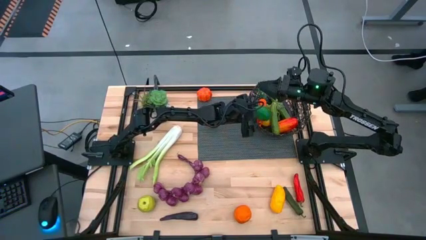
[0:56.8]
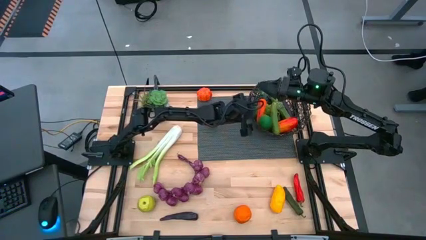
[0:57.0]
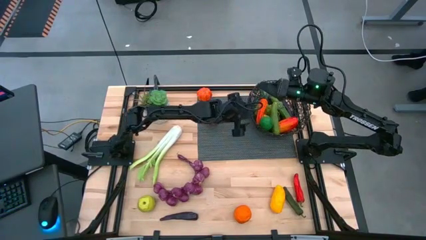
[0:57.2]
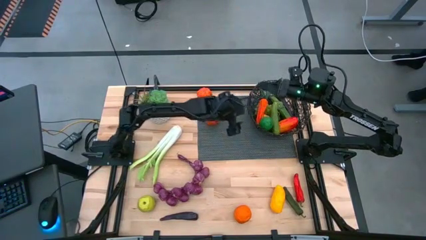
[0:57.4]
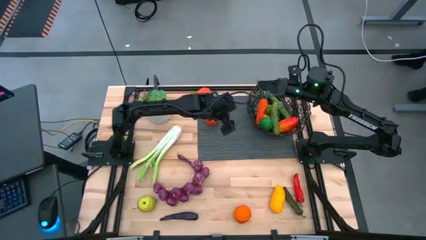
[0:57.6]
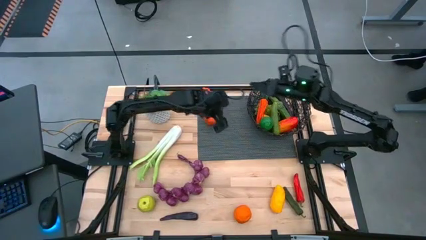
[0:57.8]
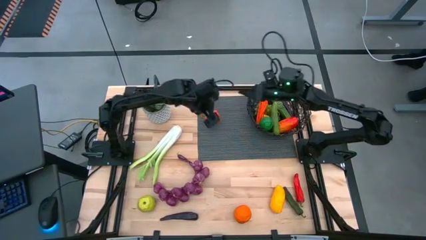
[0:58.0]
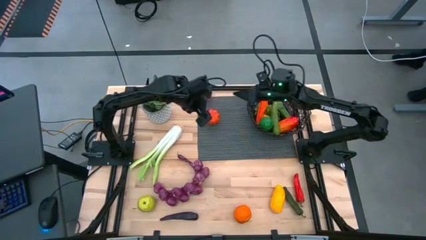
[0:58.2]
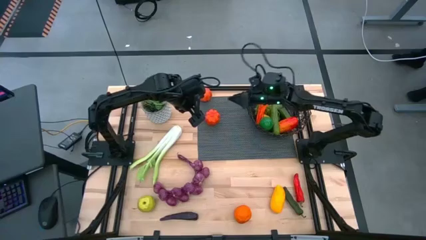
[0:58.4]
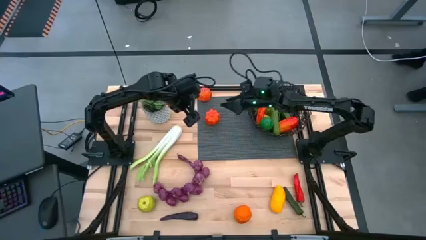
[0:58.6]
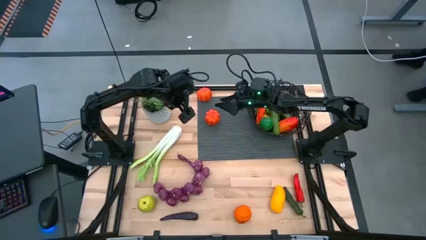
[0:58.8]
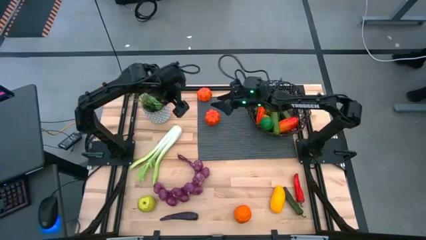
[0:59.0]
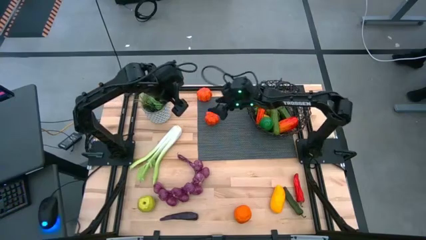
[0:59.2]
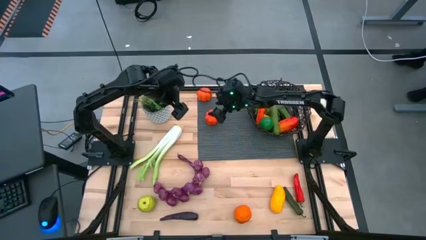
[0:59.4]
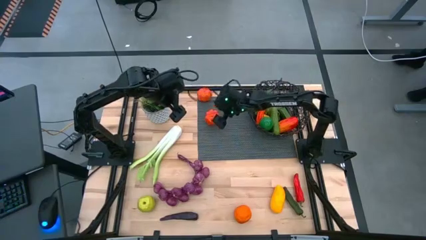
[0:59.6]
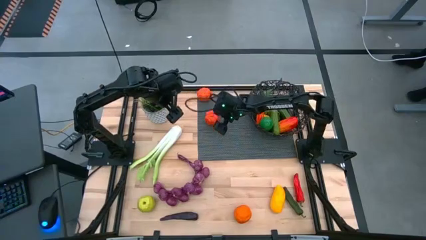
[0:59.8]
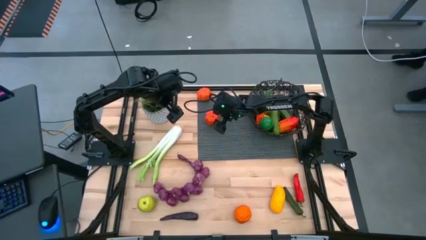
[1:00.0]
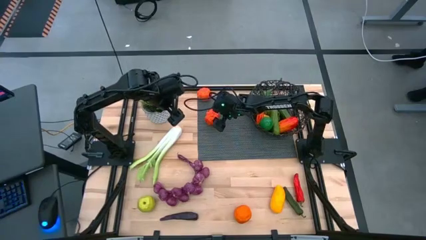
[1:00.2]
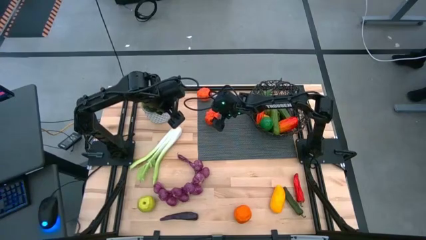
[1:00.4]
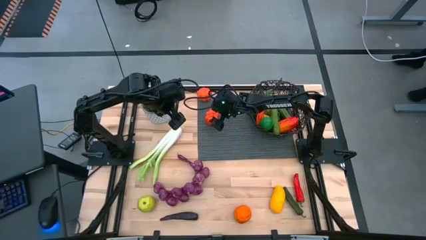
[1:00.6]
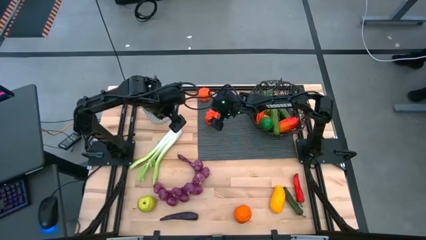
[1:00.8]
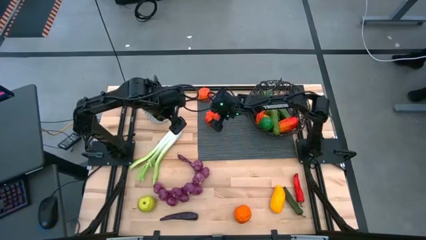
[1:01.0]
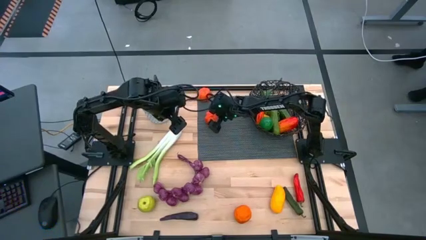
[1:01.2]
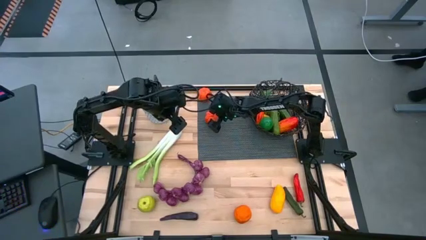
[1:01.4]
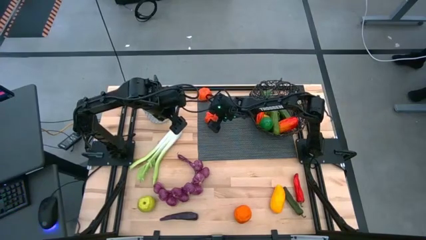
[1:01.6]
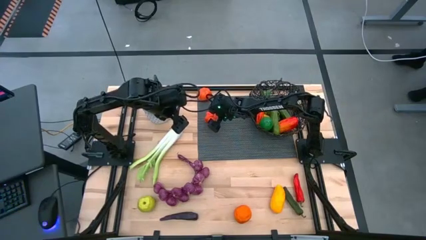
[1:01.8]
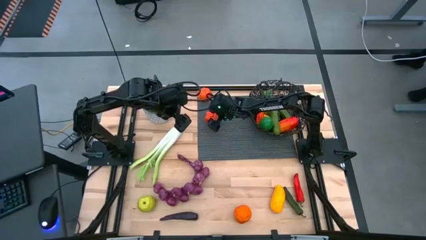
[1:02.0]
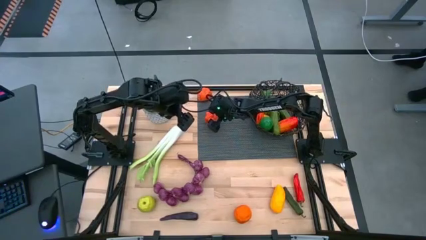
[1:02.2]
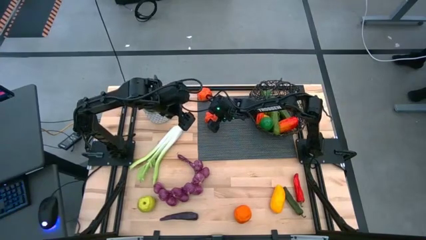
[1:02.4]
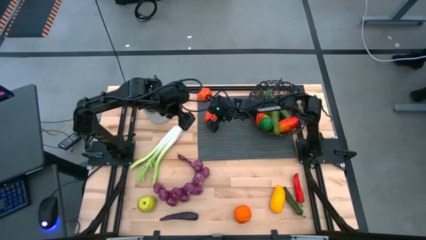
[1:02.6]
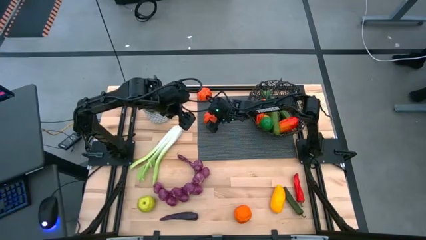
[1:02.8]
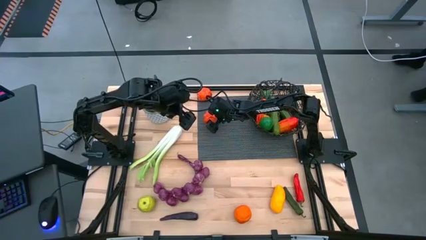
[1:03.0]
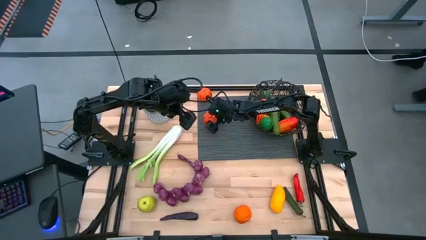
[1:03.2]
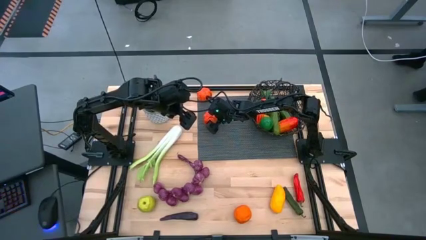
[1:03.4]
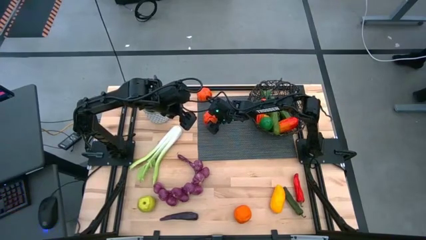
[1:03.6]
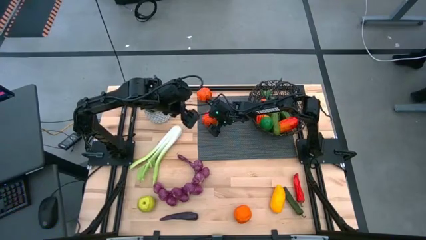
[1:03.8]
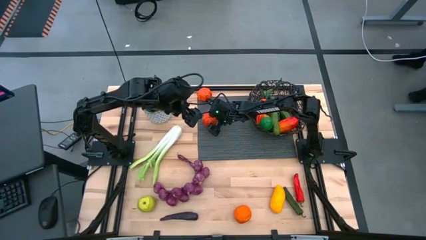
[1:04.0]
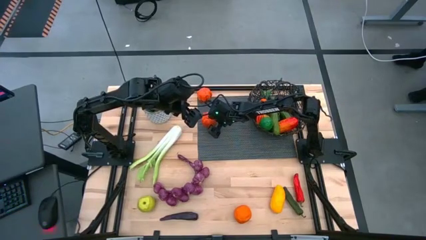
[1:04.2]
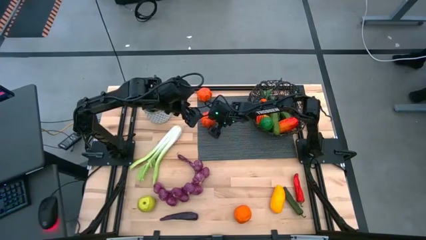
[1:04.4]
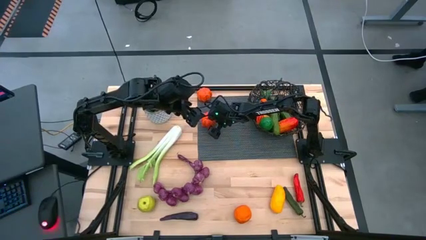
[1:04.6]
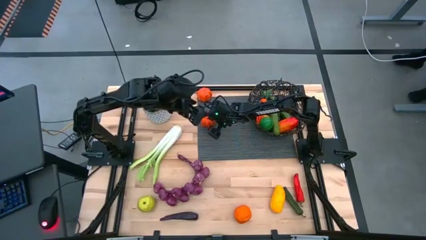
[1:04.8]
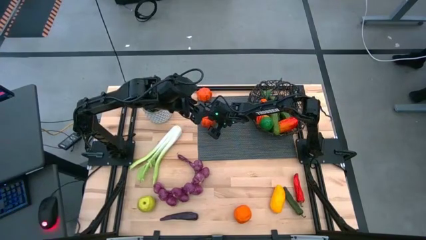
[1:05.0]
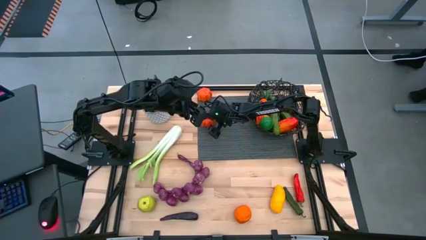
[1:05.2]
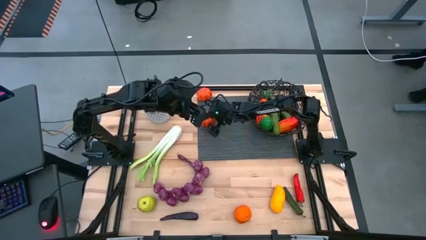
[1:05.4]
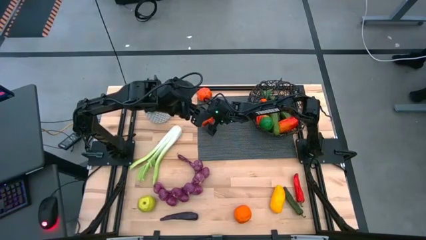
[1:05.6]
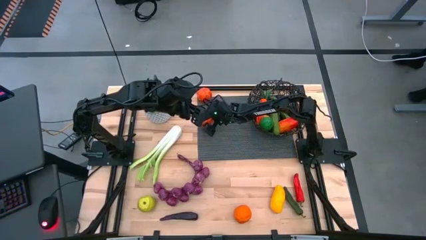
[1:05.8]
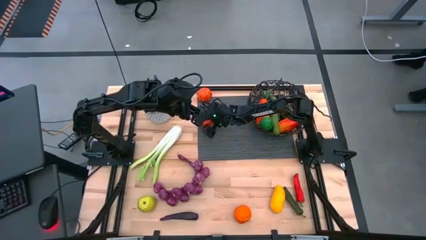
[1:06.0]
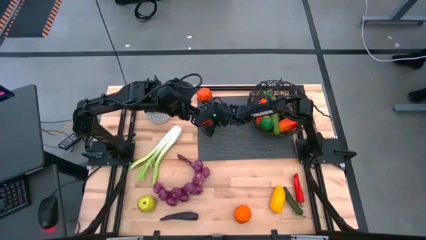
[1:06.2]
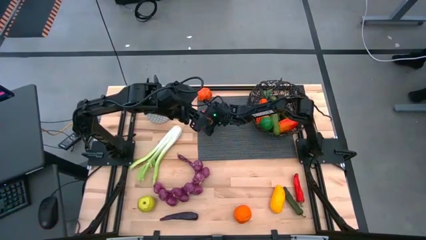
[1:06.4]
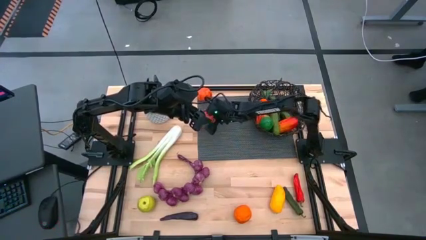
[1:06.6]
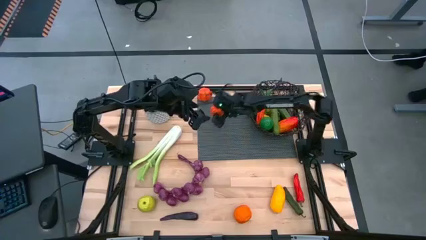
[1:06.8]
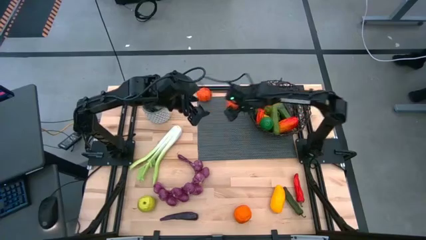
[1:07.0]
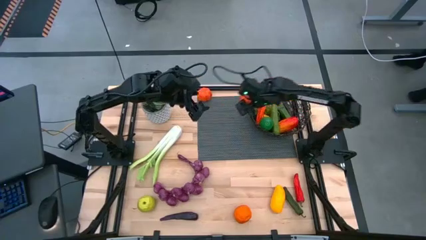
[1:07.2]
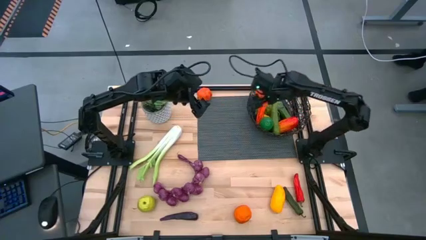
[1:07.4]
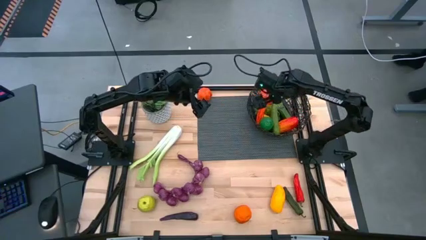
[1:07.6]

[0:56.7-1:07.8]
Task: Build produce basket
Put the bottom orange pumpkin into the black basket

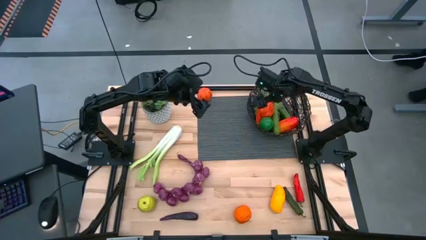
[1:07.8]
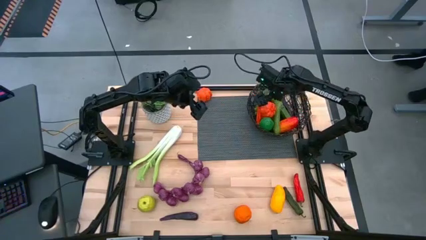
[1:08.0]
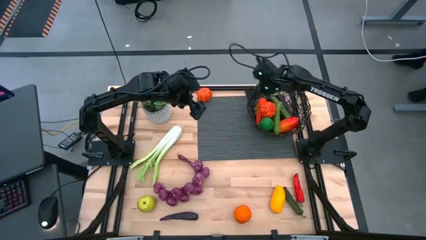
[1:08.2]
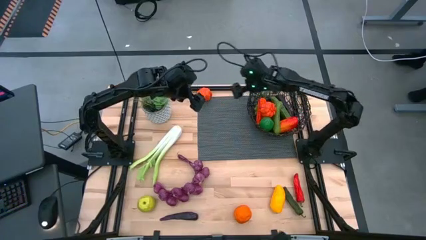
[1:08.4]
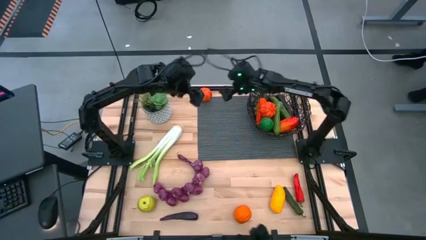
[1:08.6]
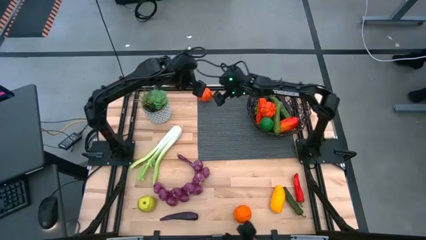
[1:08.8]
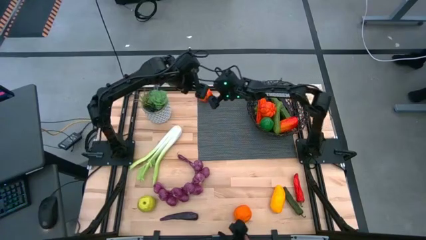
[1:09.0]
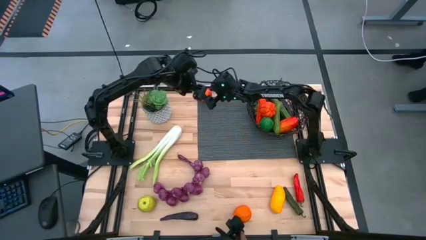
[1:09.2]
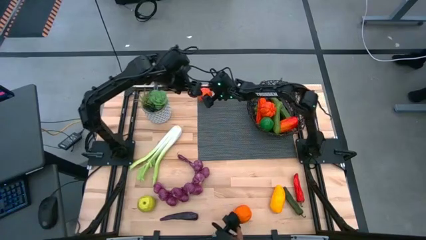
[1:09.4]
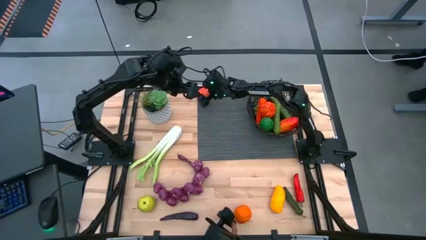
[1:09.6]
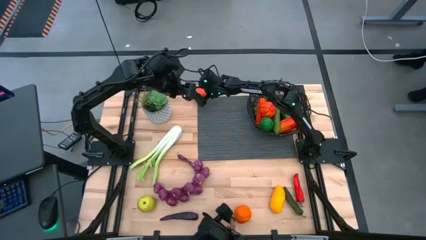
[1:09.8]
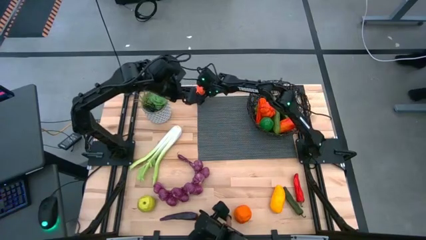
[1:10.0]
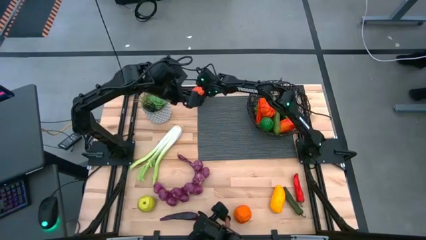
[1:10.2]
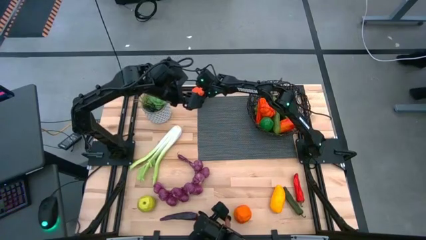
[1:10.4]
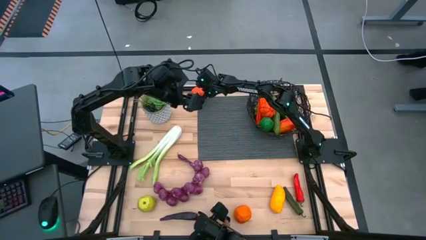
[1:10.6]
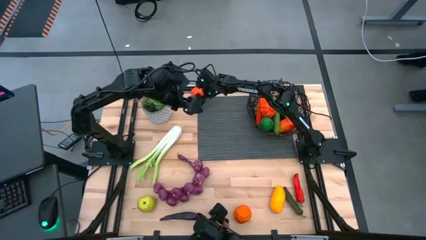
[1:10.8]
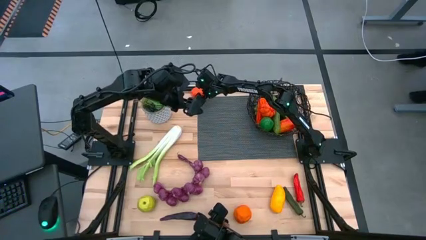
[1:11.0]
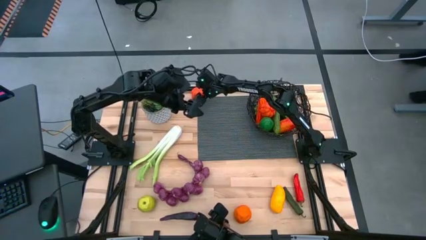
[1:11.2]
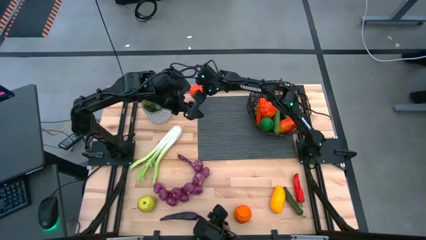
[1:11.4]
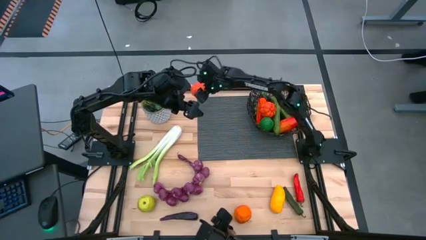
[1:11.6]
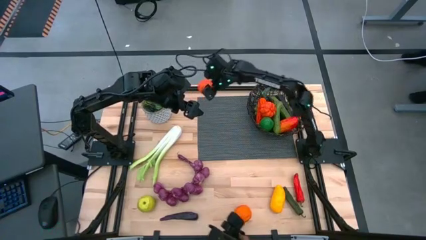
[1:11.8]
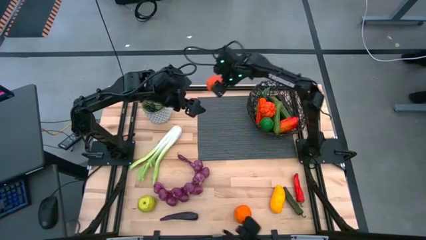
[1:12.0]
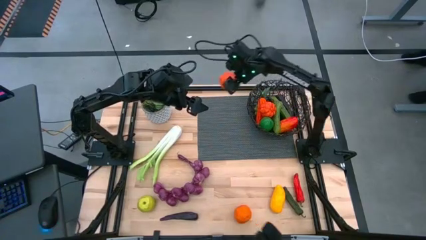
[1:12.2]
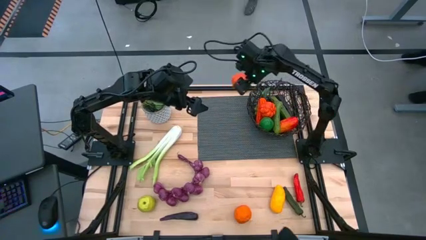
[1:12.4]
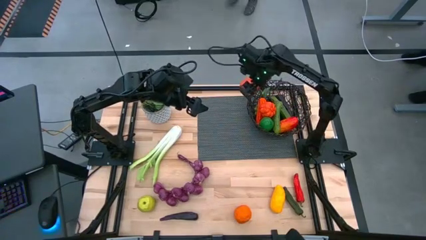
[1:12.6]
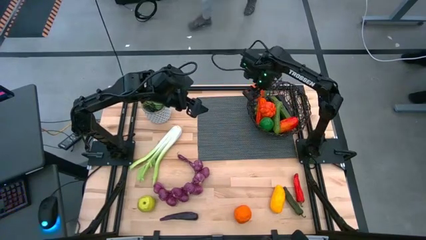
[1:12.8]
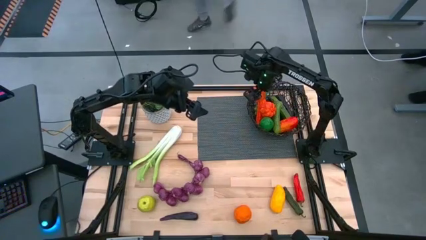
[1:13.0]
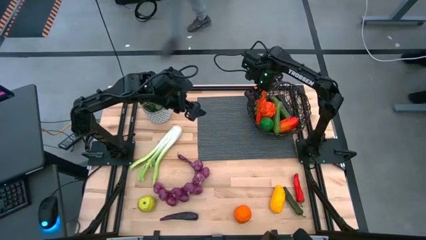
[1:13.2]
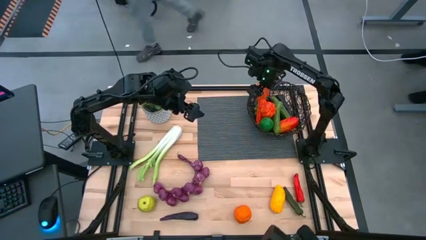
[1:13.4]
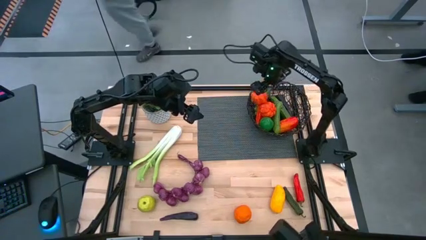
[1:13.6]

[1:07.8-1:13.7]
Put the bottom orange pumpkin into the black basket
